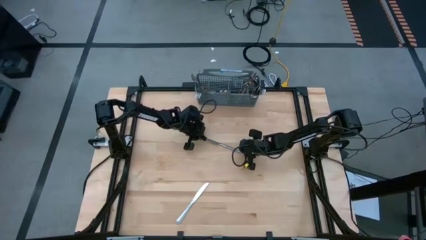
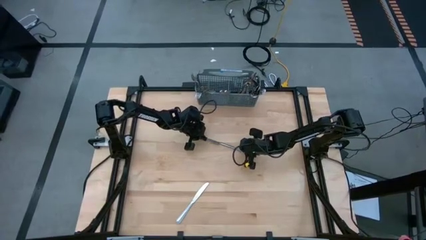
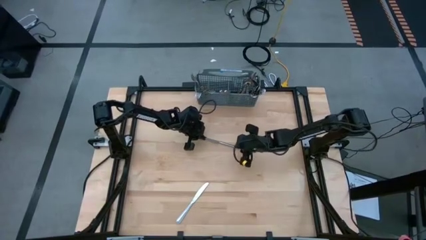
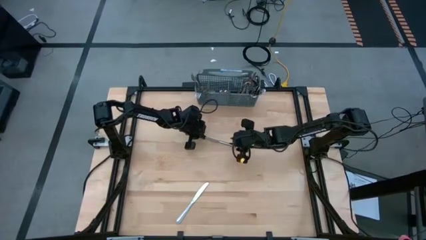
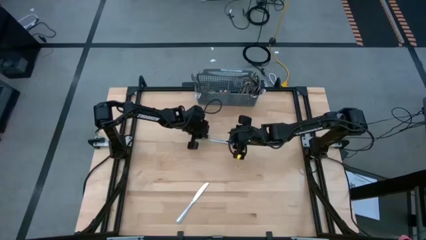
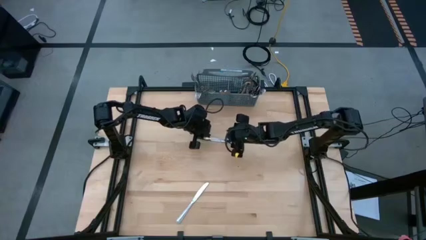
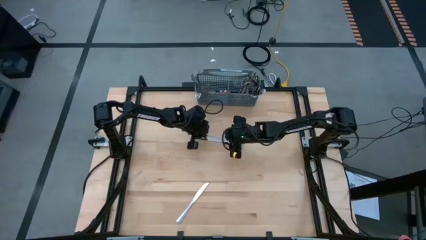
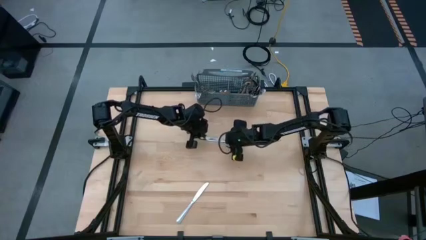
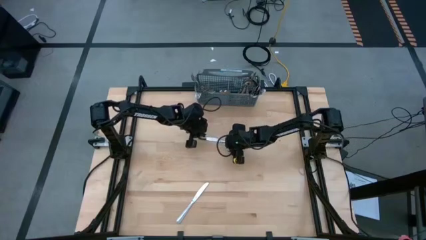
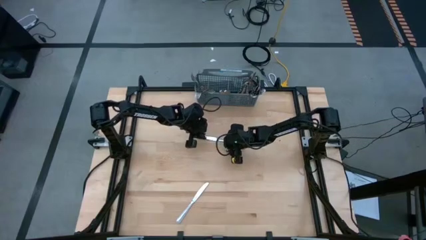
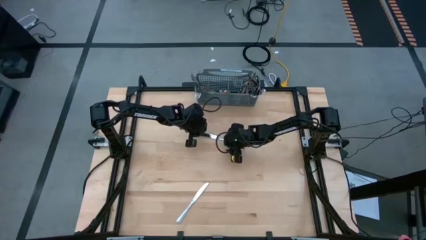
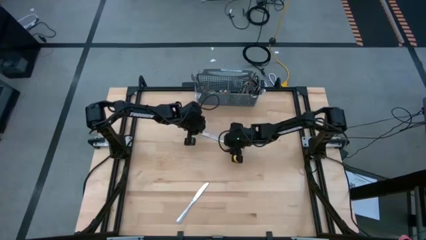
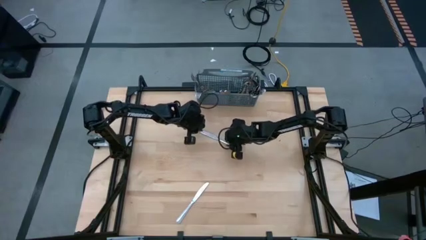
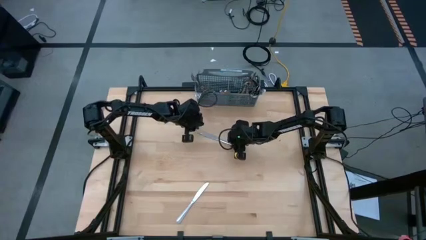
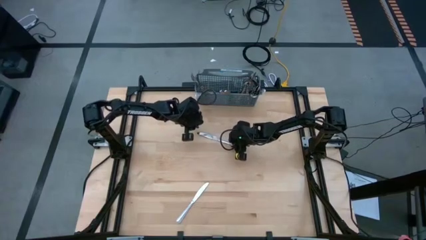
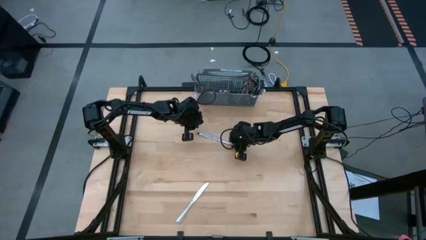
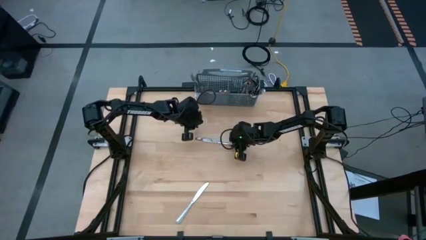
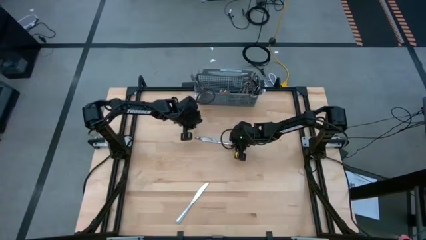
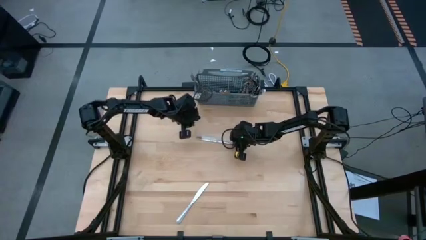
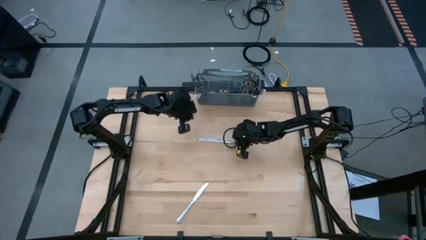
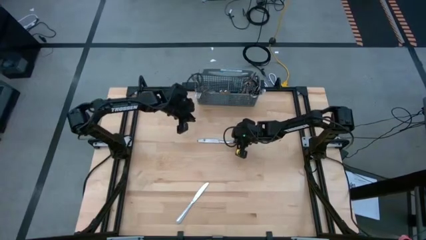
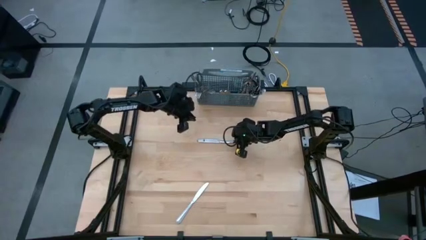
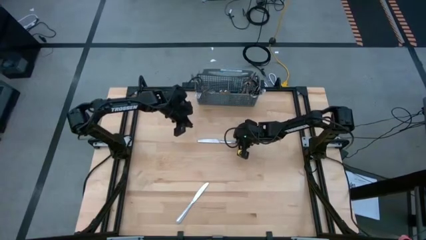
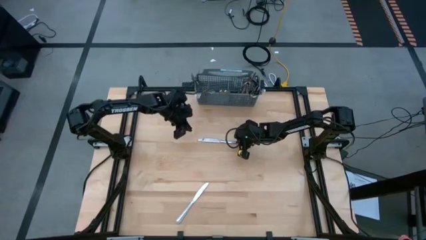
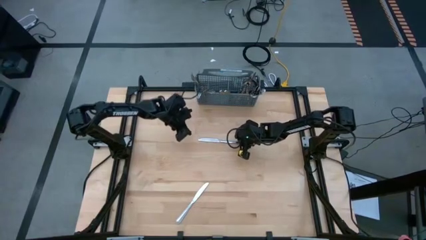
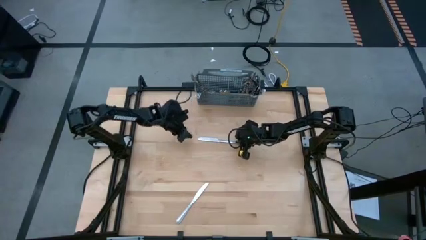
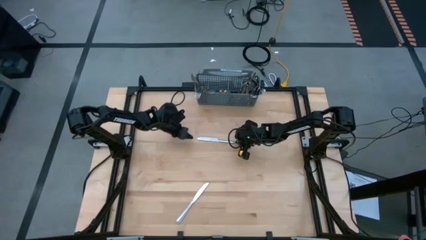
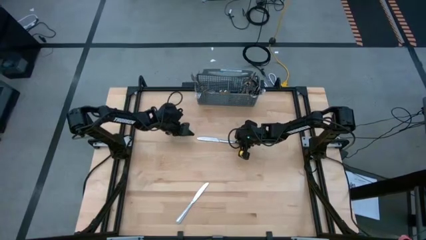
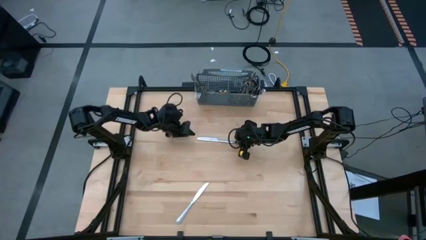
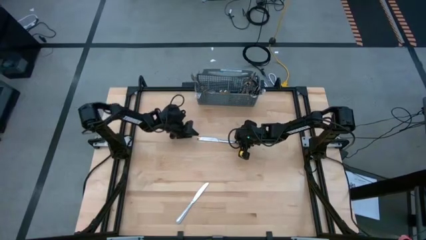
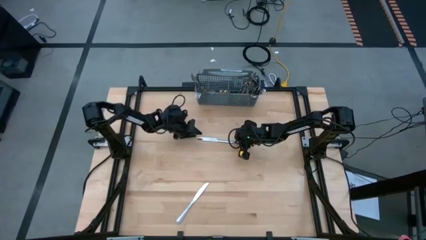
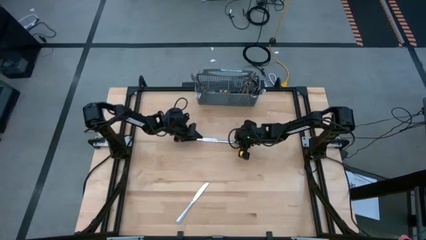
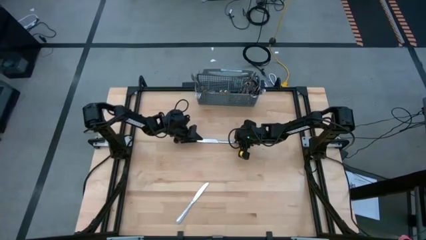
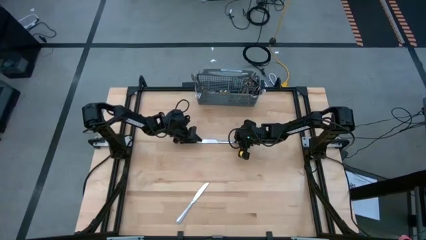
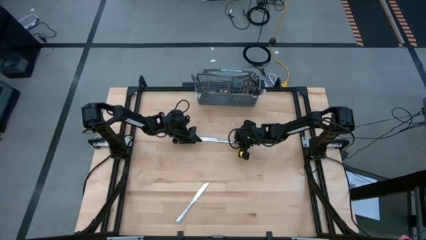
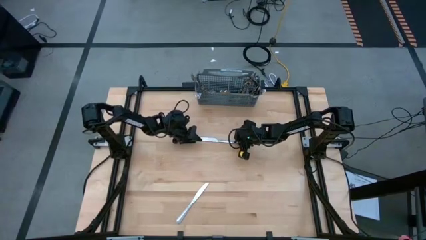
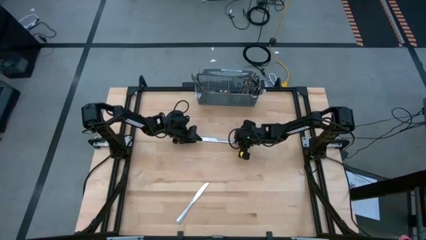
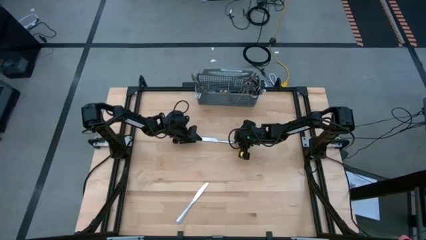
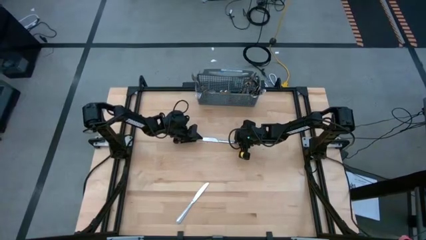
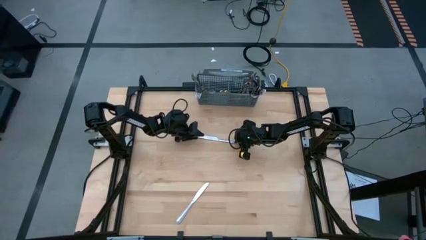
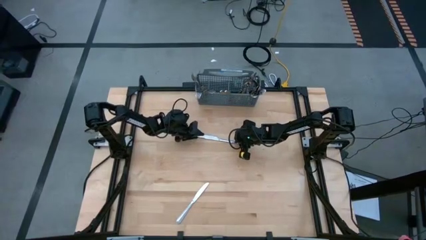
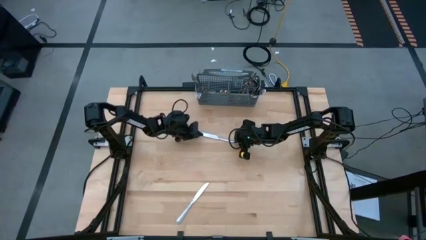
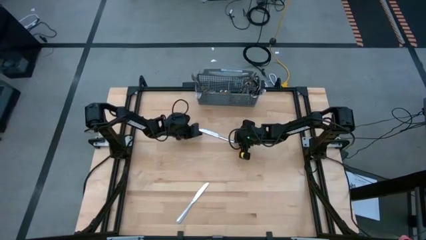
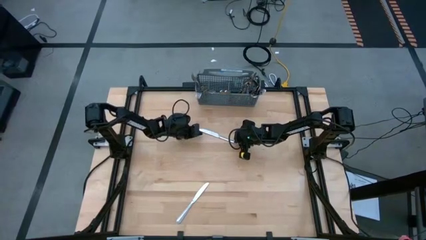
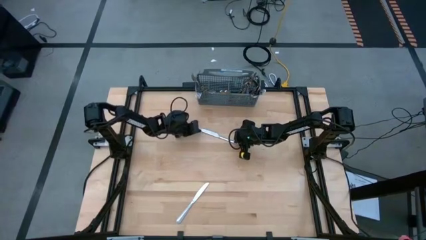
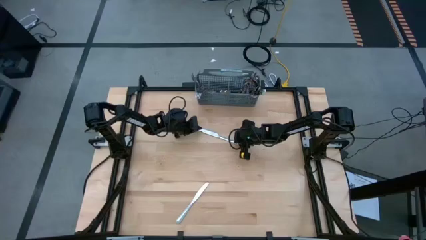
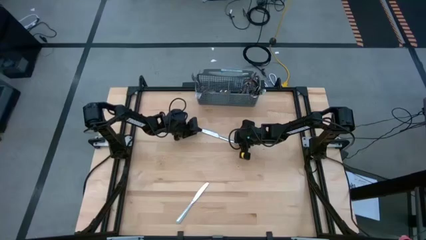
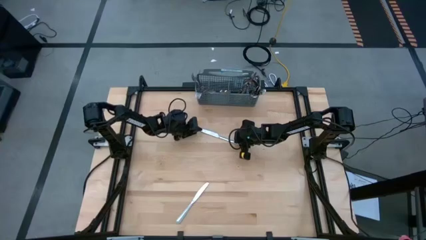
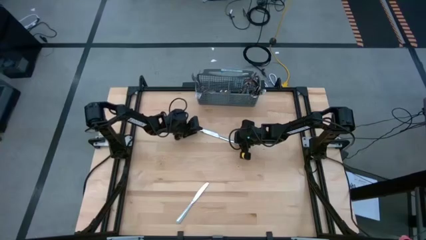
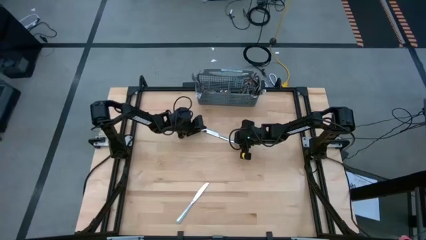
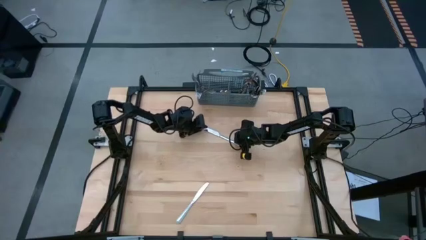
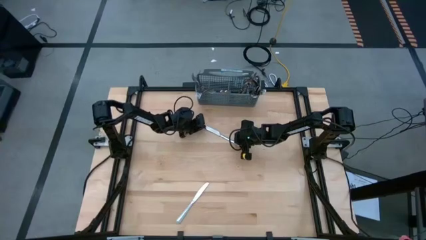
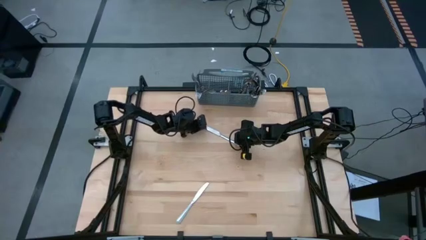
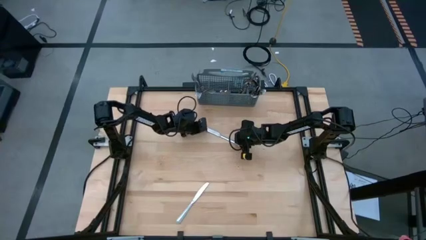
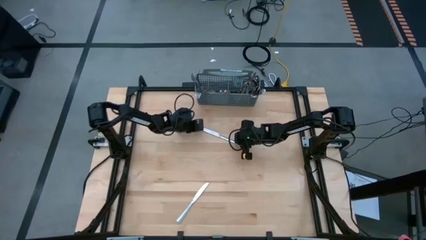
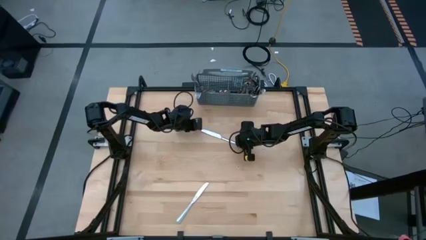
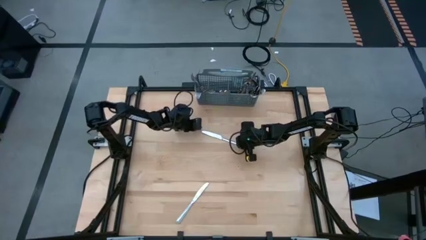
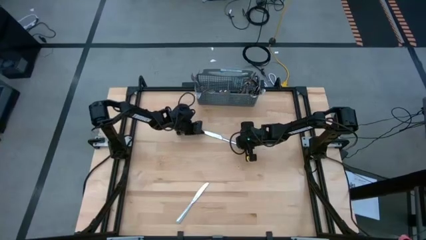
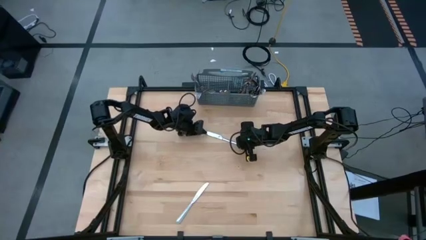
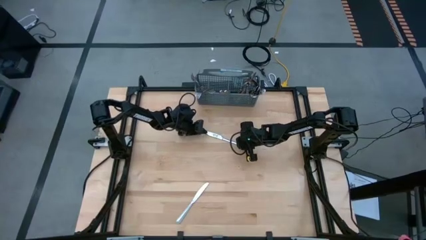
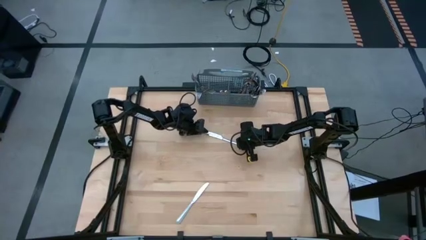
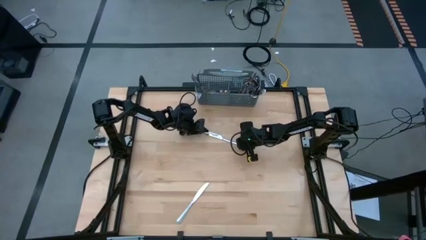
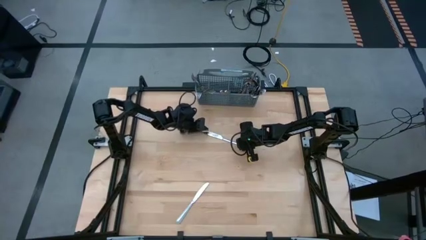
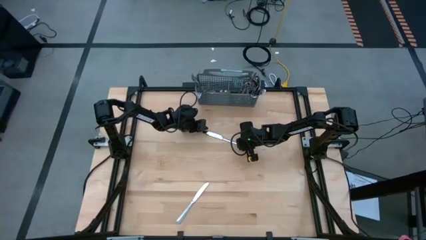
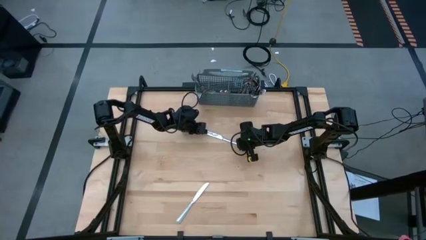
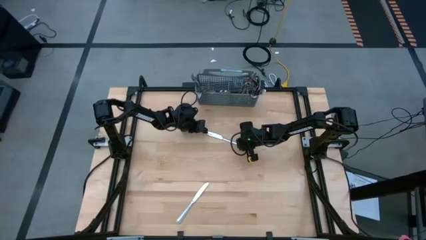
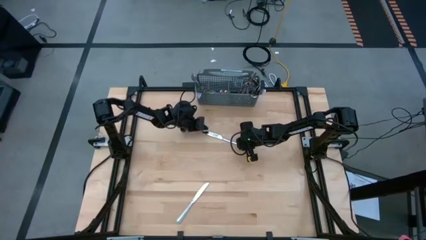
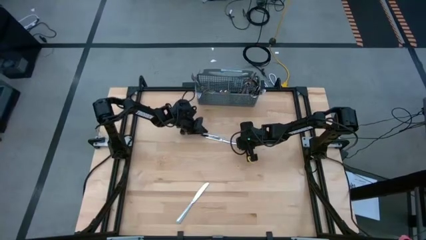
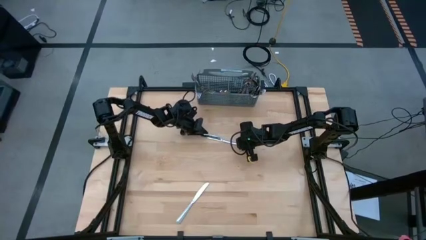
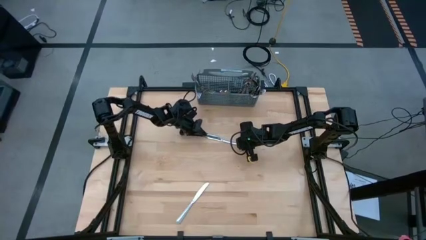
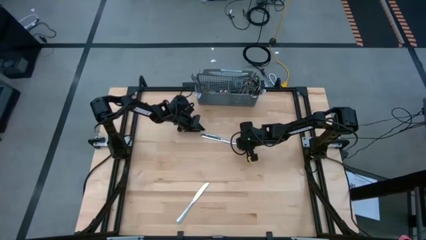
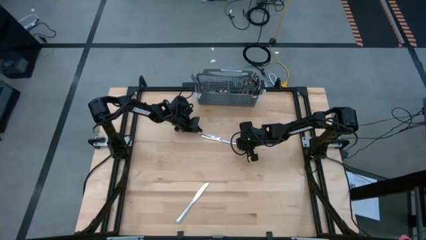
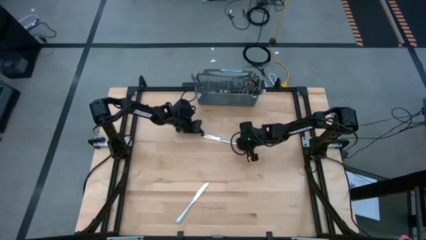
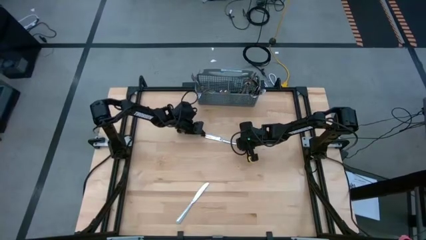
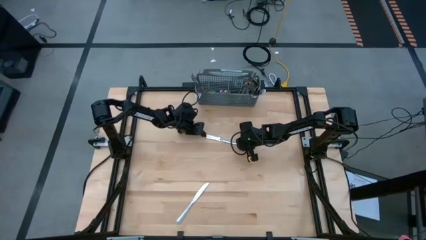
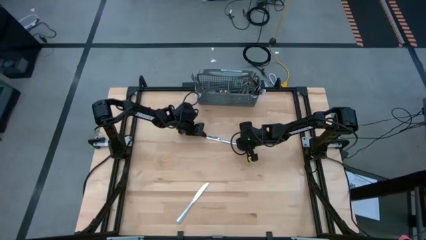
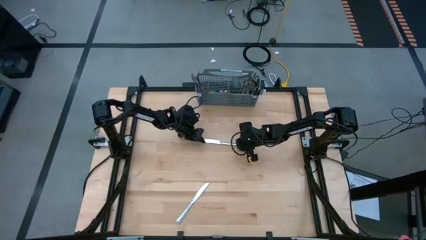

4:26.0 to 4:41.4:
Task: Sort silverware
Put the silver table knife into the silverware organizer

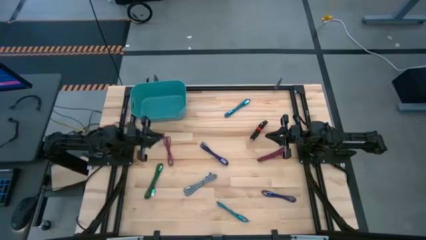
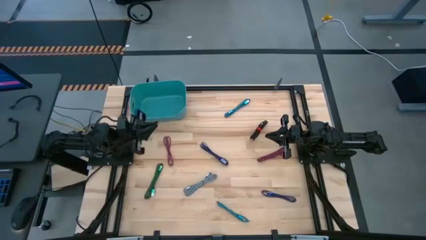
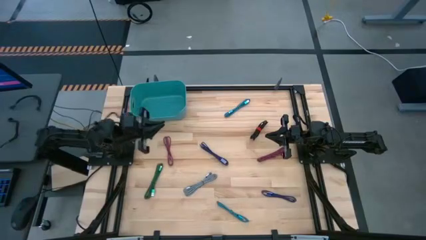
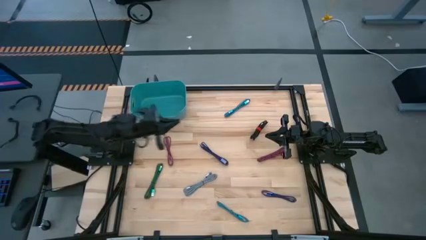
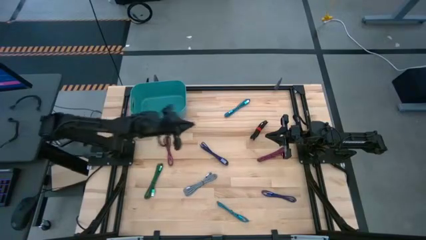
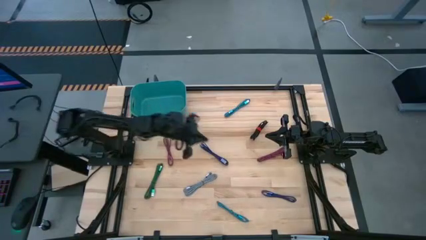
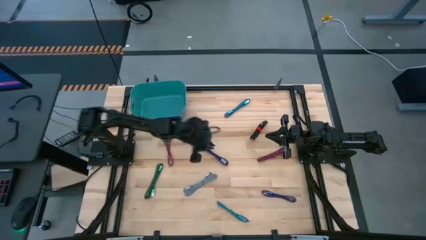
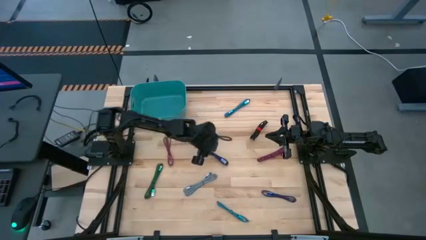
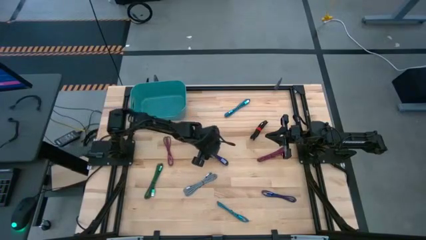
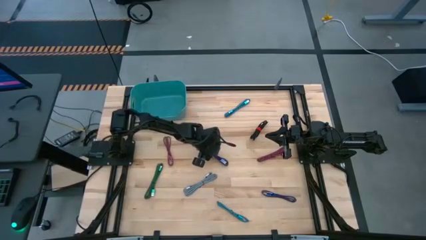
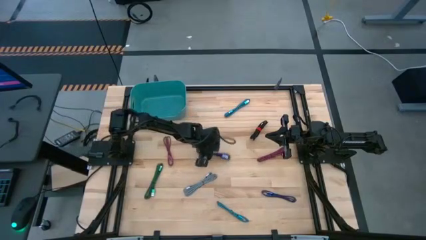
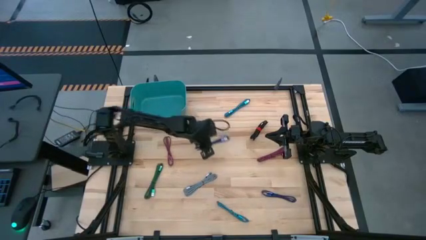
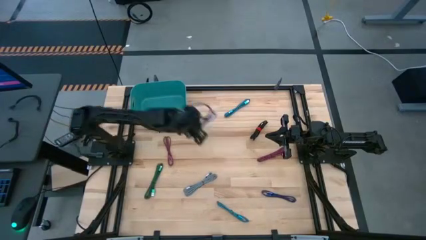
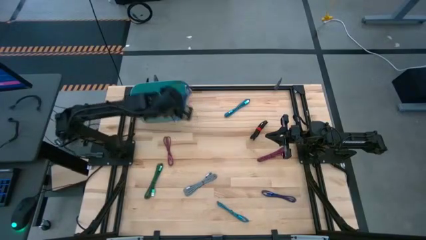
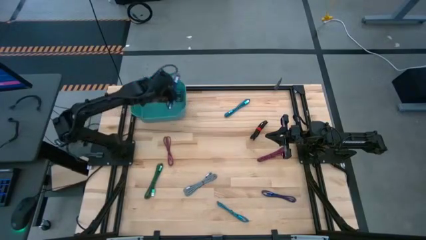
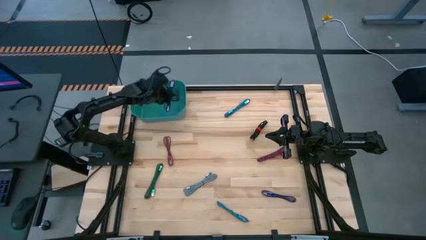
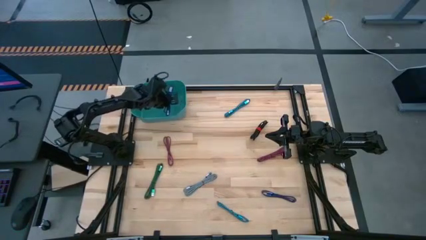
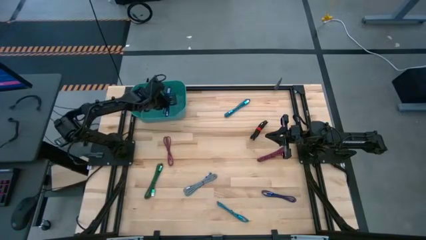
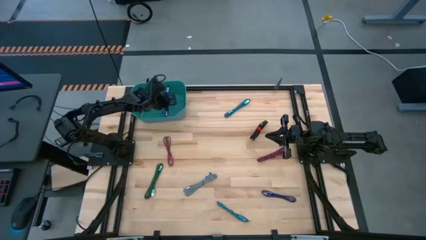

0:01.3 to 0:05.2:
Task: Pick and place USB-C Cables
Put the top purple charger cable into the green bin
